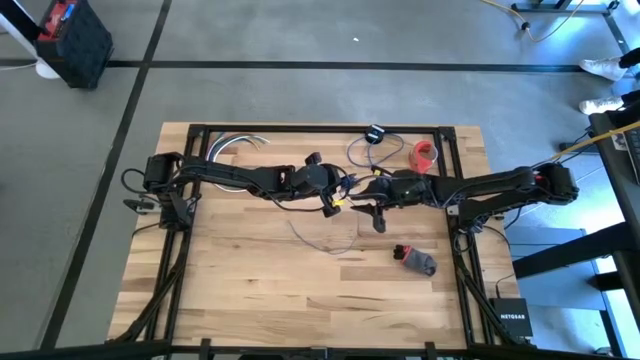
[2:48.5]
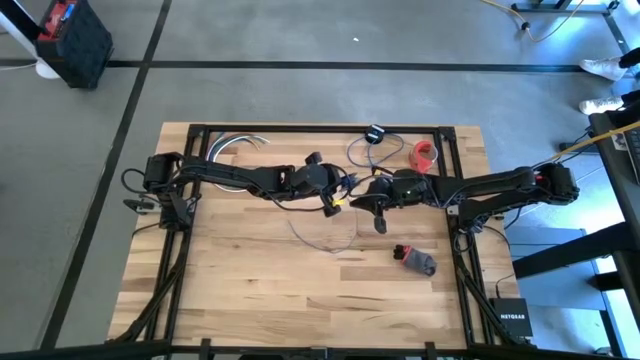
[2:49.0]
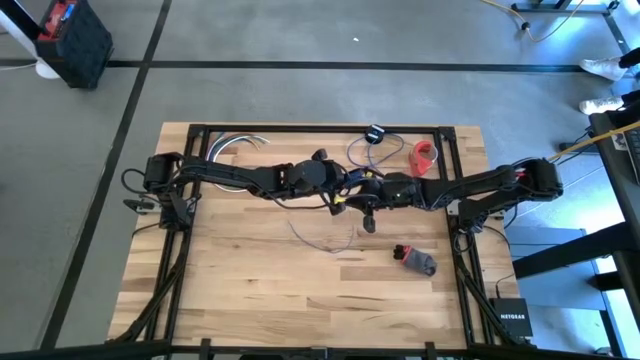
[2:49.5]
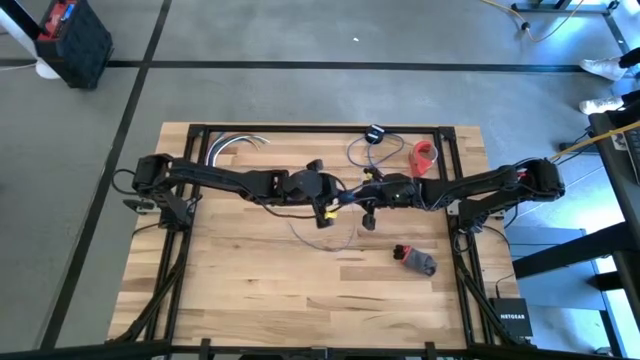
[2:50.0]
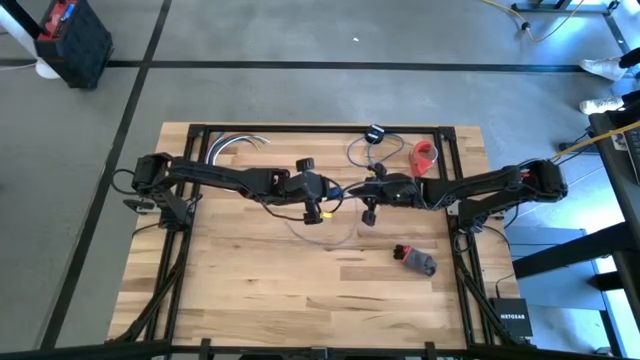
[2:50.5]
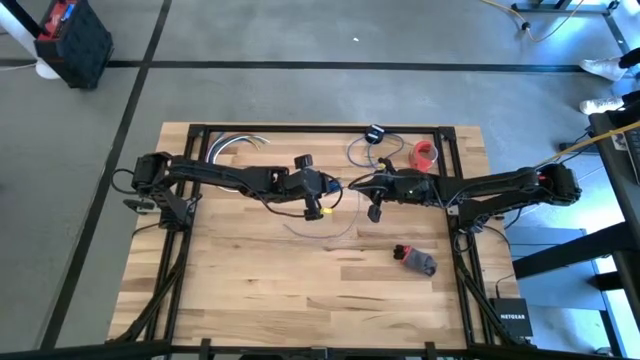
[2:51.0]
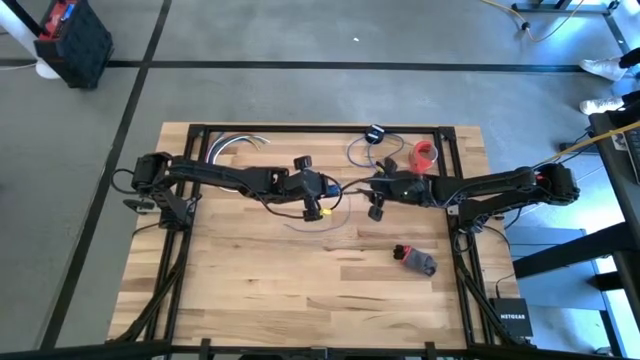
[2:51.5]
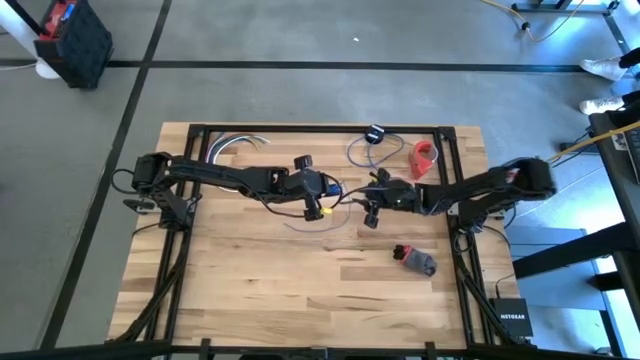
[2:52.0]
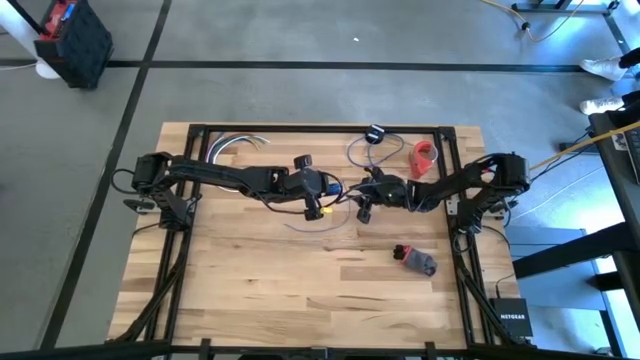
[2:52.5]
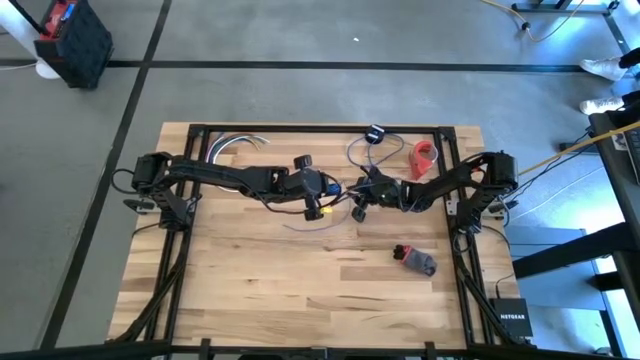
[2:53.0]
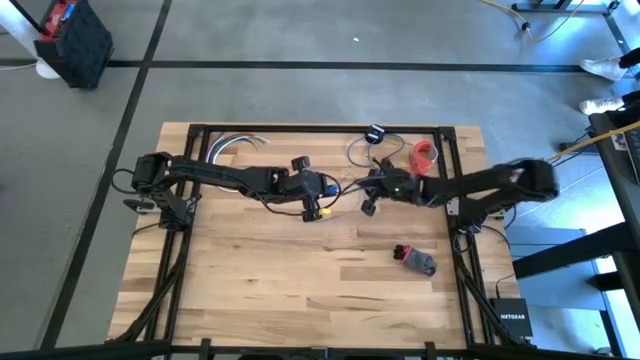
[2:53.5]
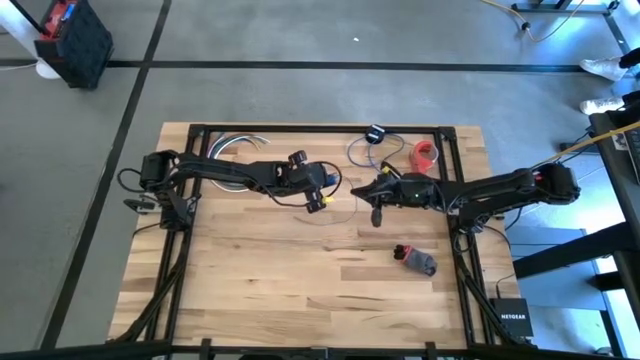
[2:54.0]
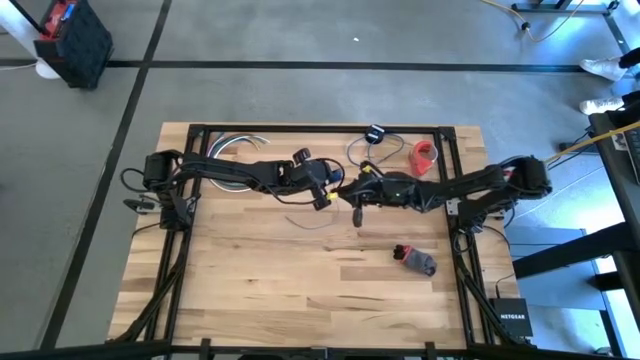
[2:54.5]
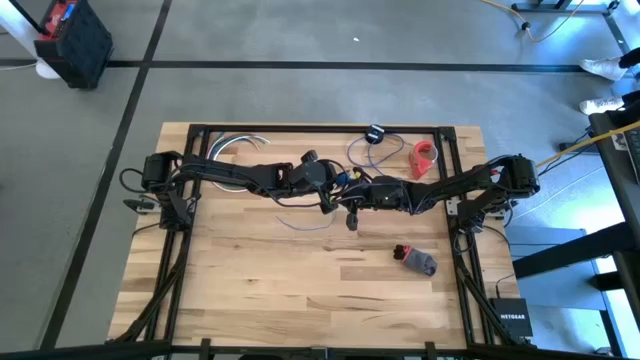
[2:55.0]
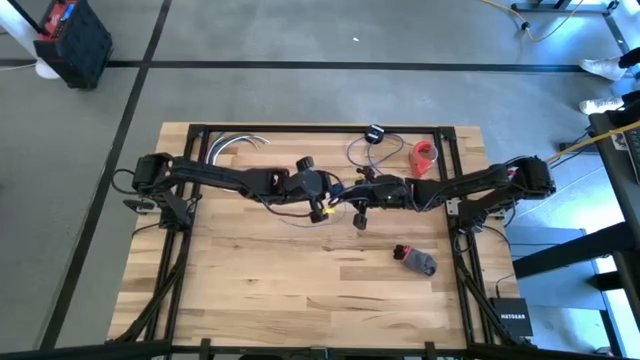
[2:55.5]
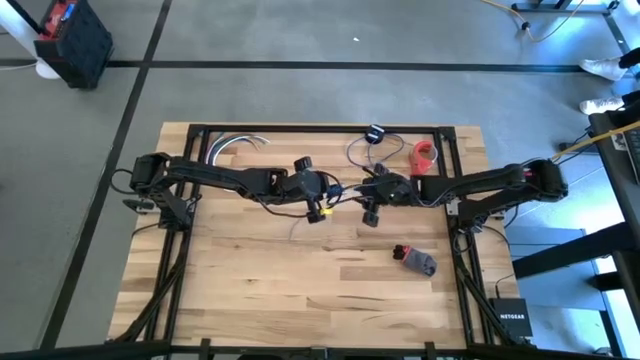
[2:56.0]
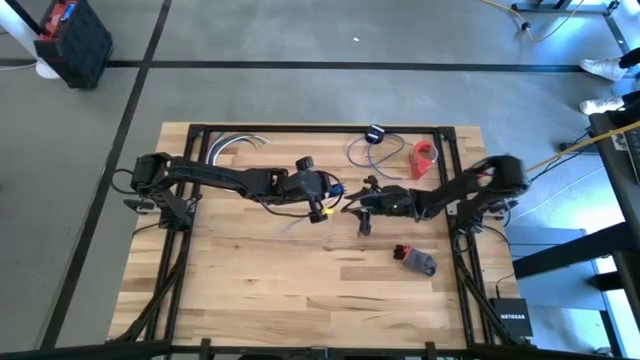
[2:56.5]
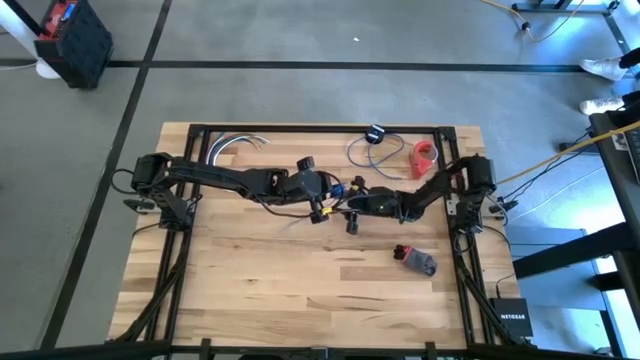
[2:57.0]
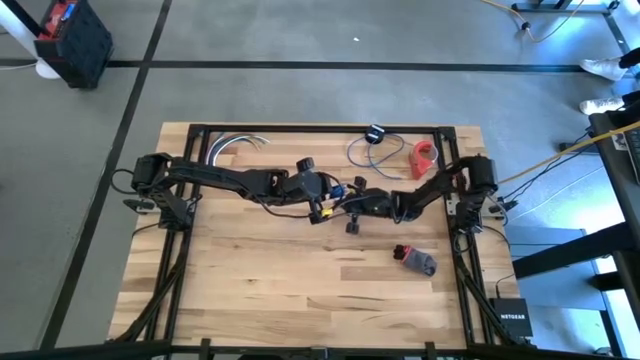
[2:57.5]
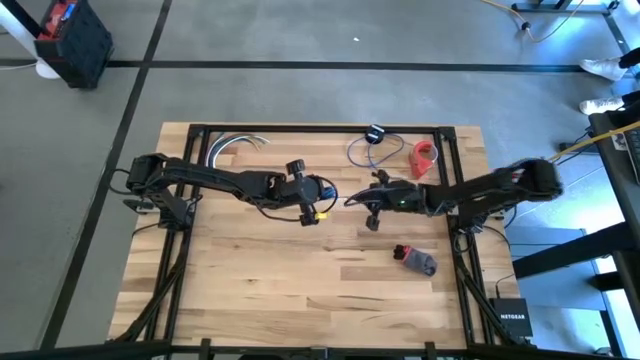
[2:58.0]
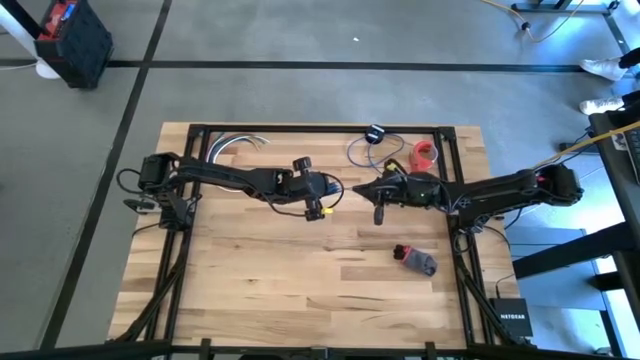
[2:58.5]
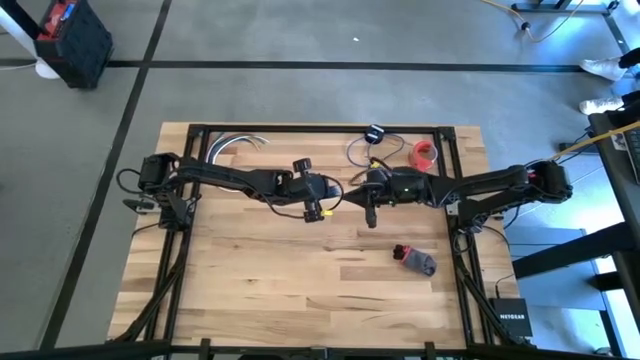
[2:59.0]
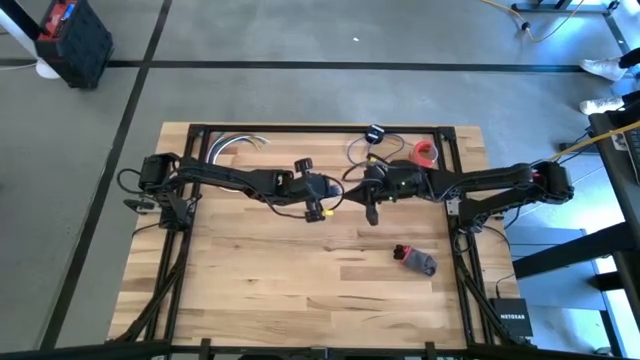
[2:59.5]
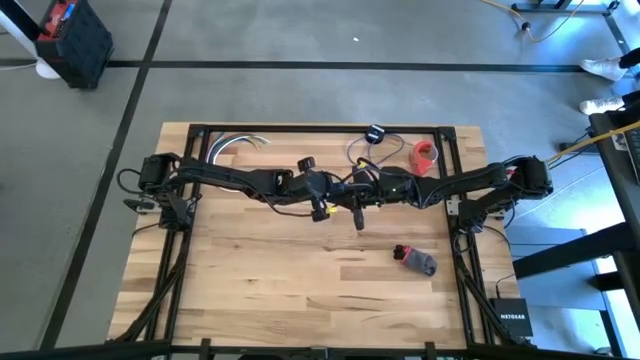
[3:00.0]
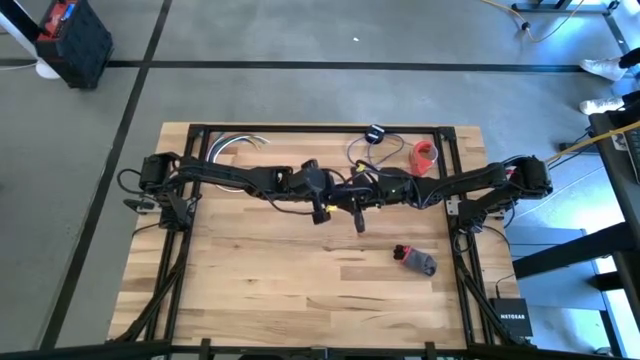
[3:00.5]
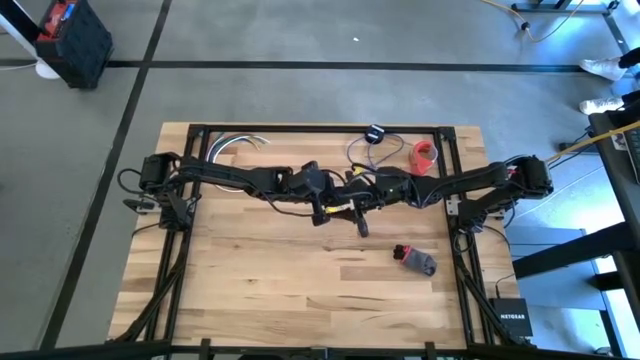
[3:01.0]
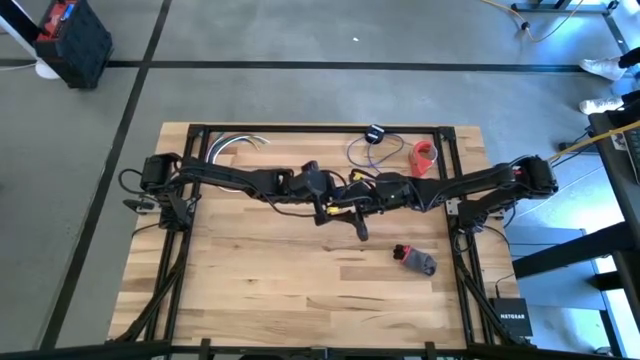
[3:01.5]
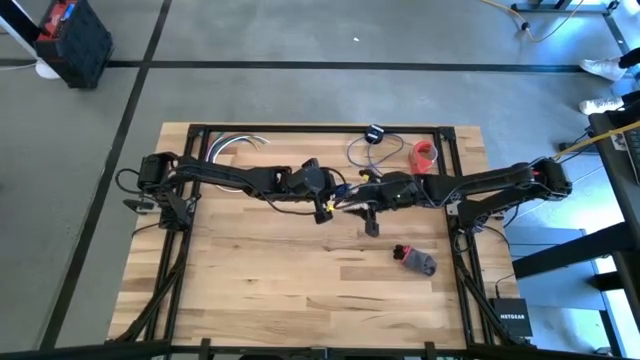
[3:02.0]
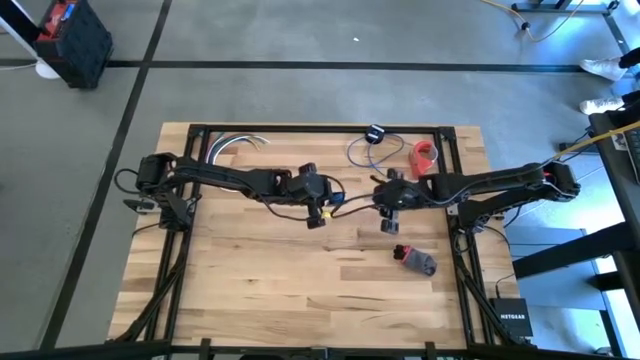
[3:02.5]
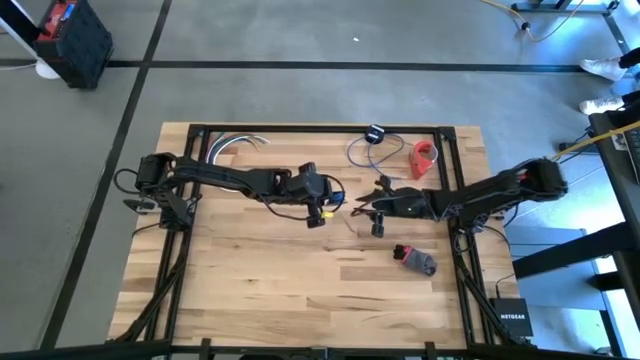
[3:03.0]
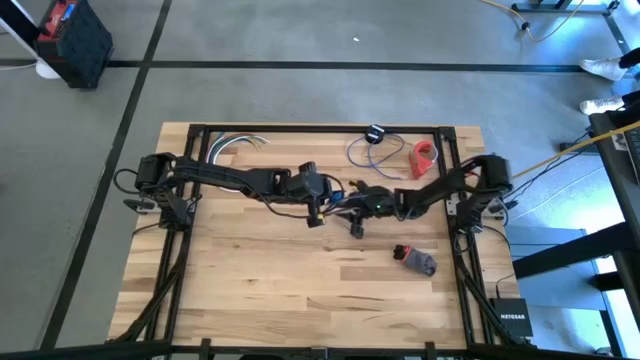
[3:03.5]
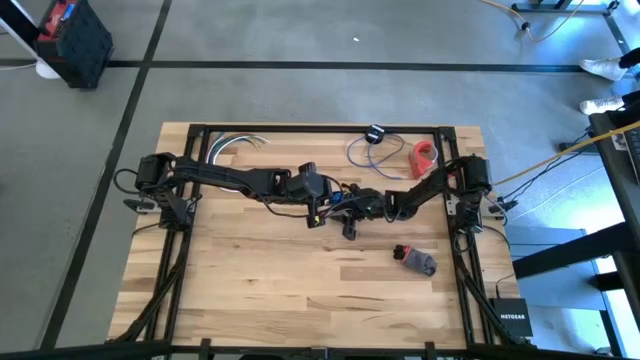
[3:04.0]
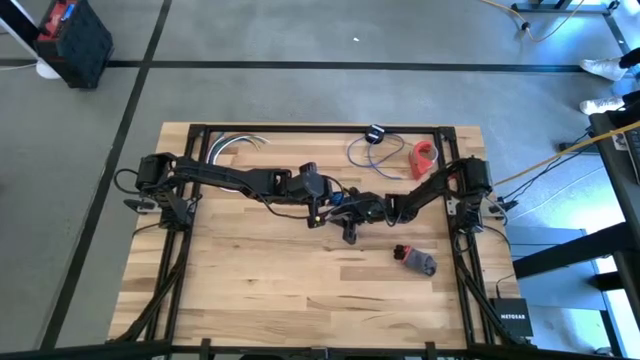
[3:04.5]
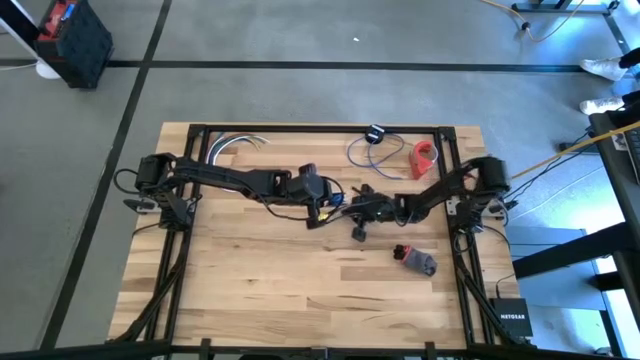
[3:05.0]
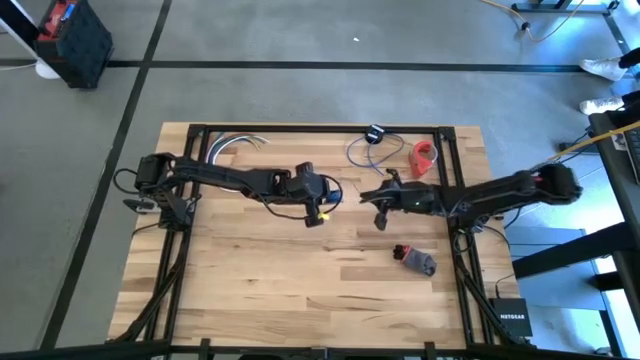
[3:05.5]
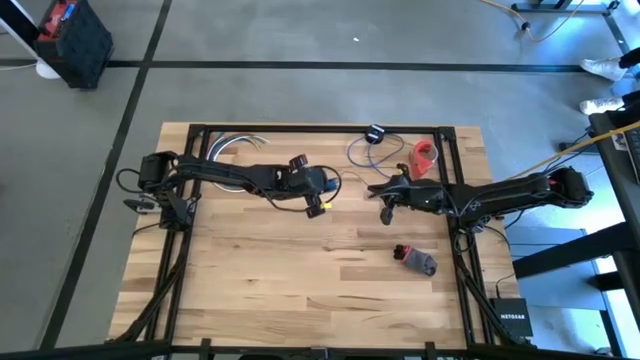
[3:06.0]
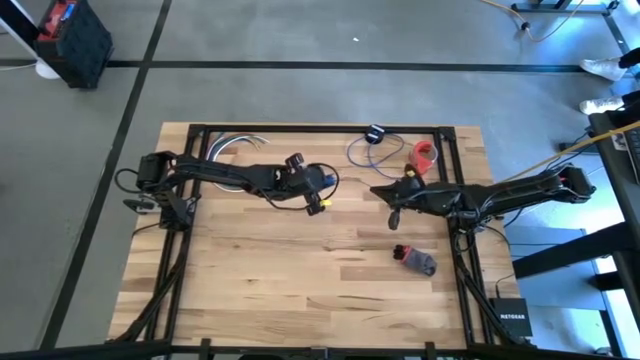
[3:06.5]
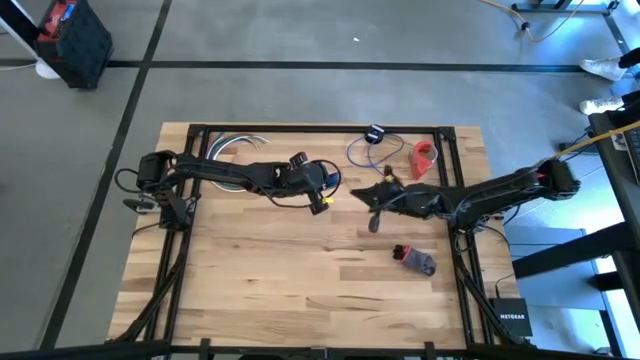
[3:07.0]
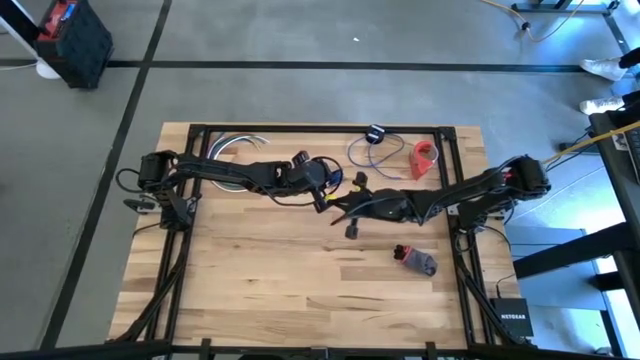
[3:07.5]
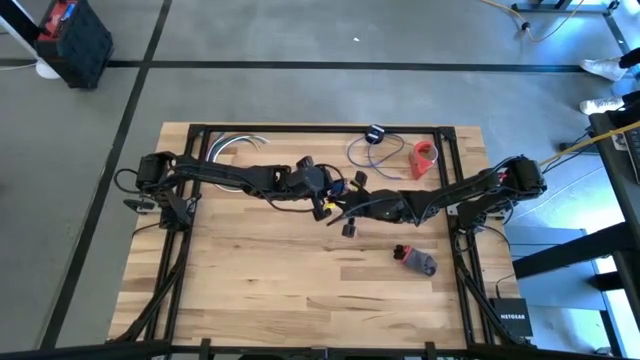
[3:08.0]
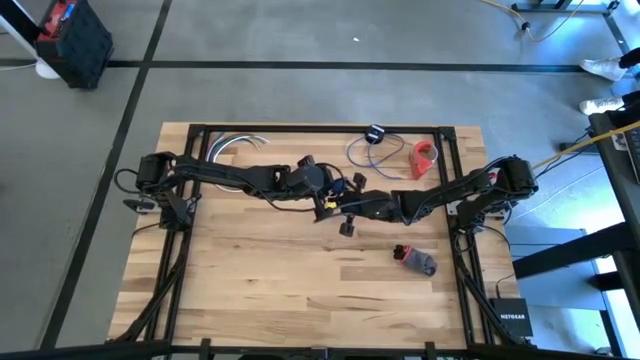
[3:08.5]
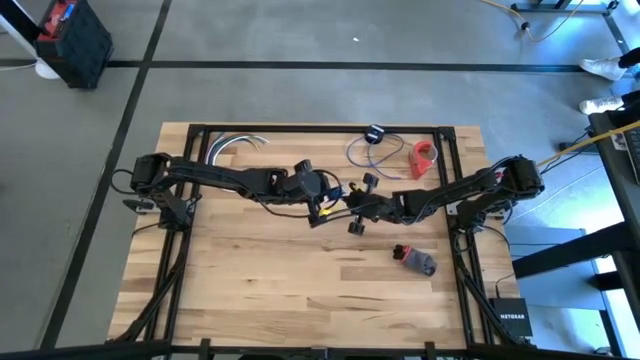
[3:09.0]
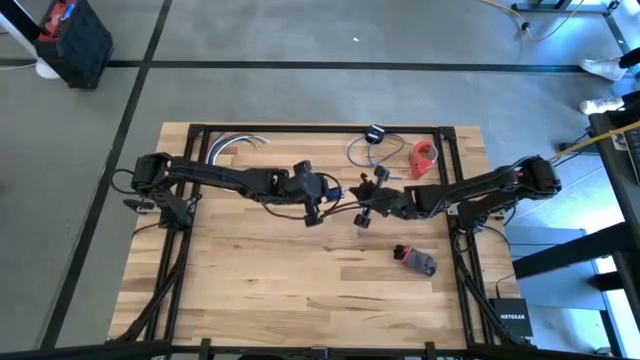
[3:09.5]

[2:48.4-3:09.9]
Task: Coil cords
Coil the blue wire onto the spool

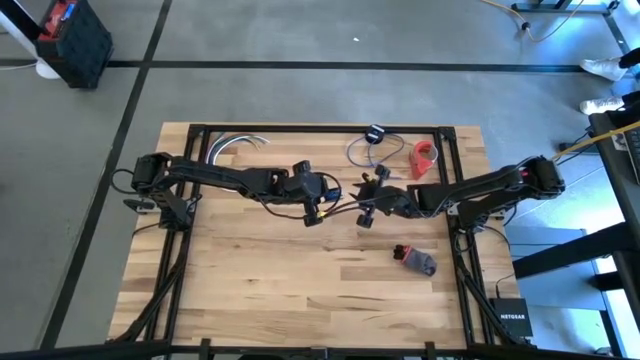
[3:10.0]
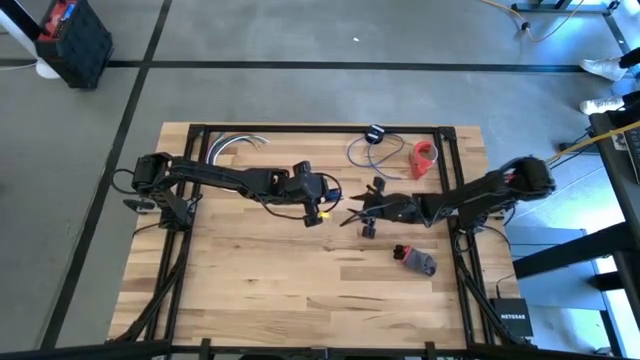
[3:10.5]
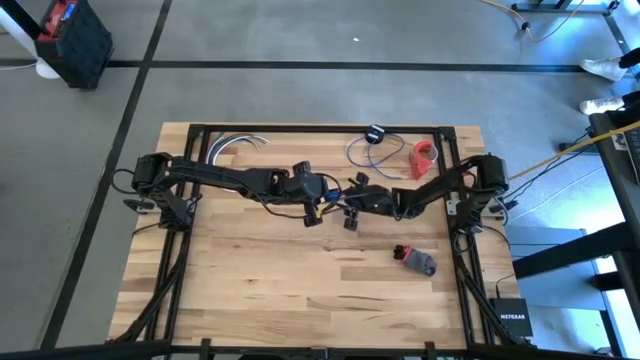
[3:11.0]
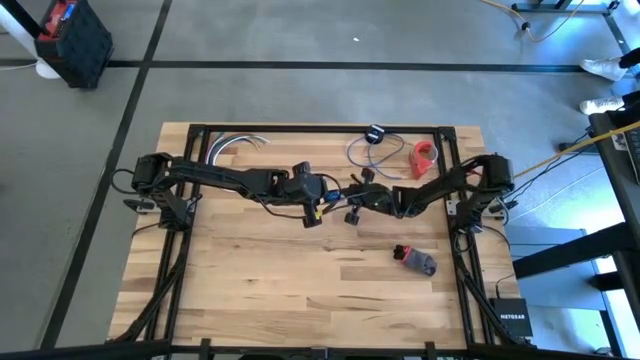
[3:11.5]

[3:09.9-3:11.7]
Coil the blue wire onto the spool
